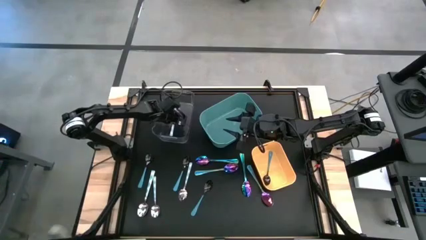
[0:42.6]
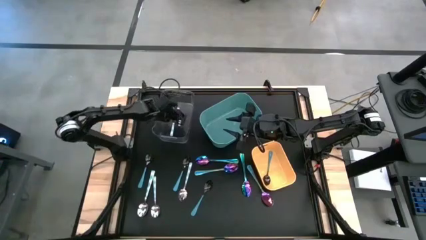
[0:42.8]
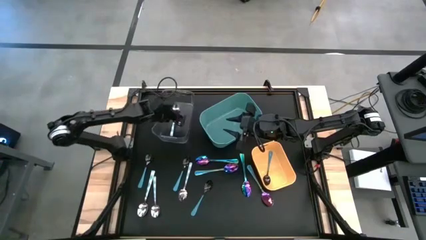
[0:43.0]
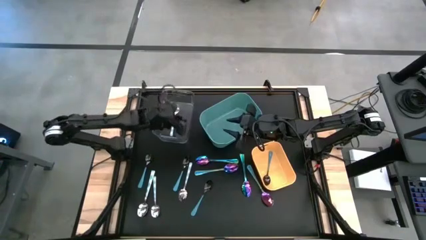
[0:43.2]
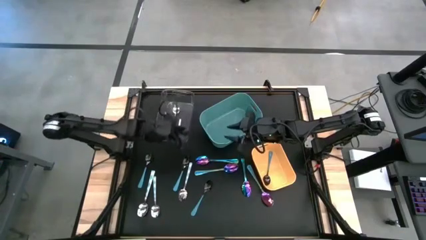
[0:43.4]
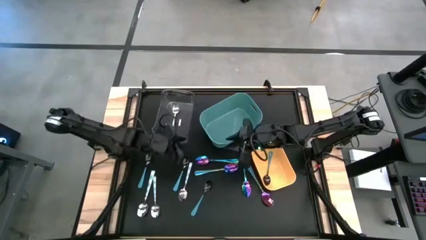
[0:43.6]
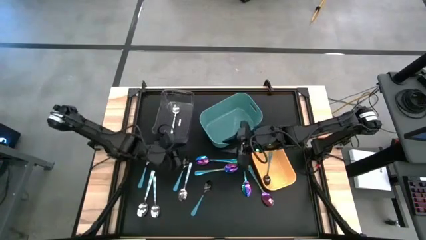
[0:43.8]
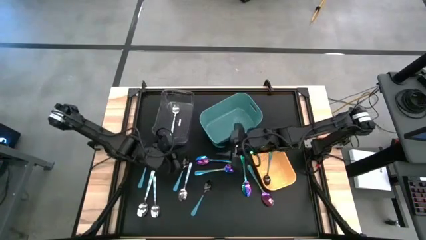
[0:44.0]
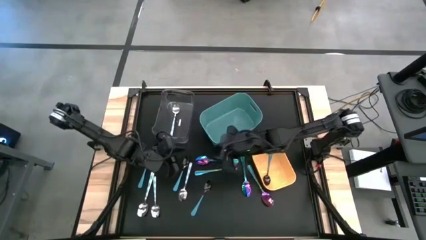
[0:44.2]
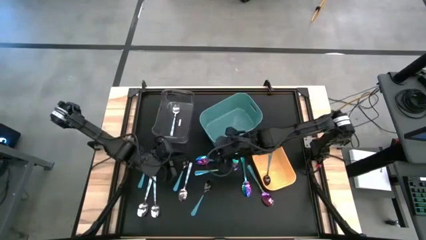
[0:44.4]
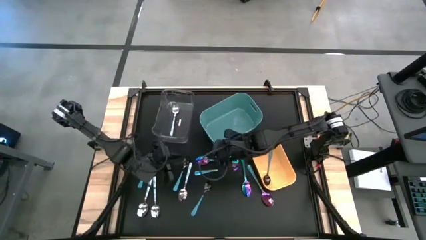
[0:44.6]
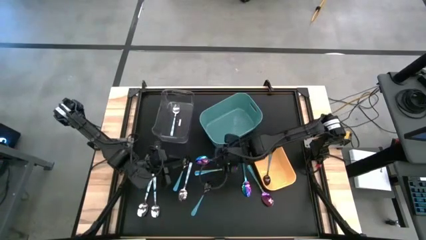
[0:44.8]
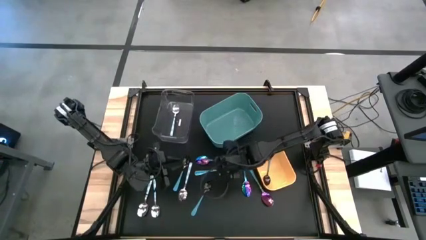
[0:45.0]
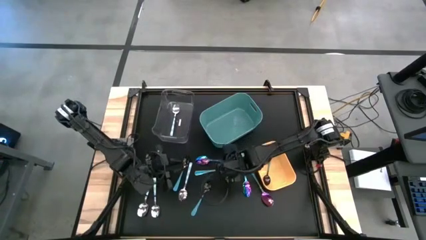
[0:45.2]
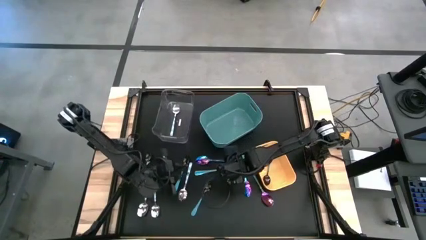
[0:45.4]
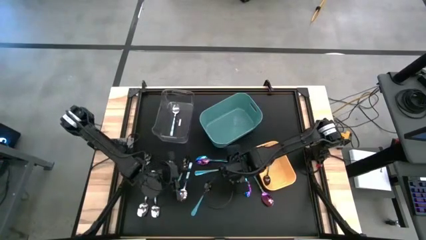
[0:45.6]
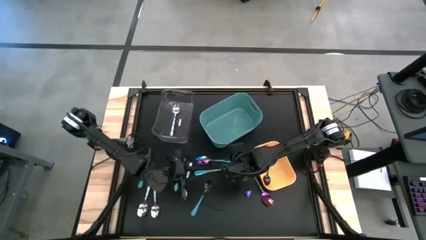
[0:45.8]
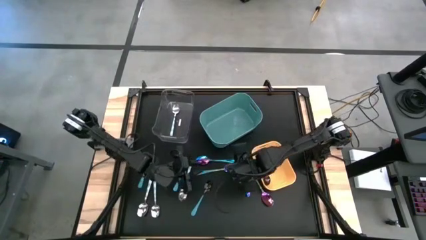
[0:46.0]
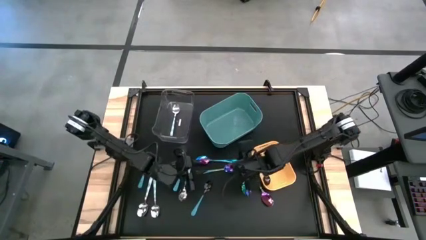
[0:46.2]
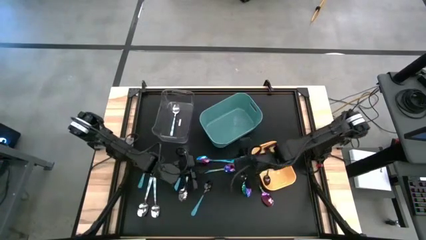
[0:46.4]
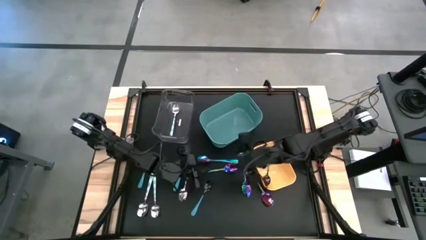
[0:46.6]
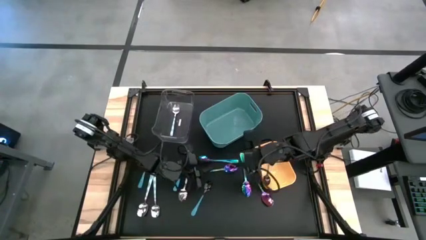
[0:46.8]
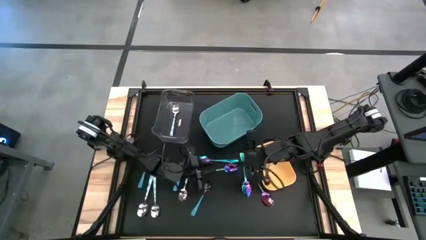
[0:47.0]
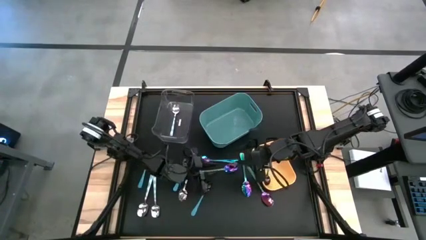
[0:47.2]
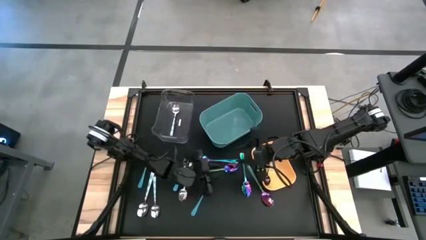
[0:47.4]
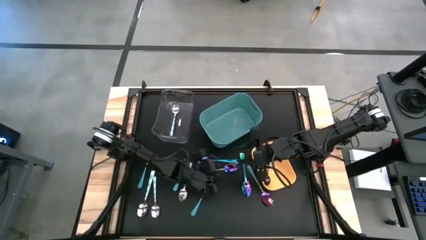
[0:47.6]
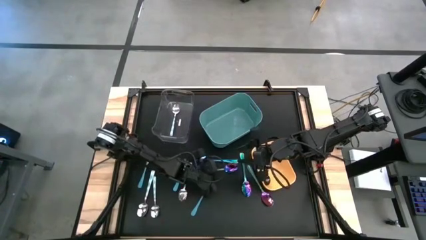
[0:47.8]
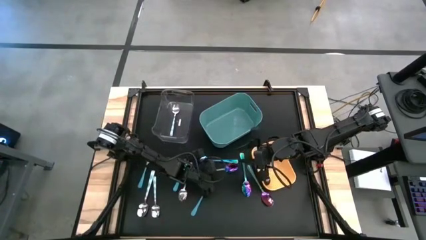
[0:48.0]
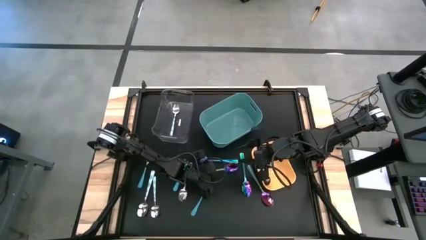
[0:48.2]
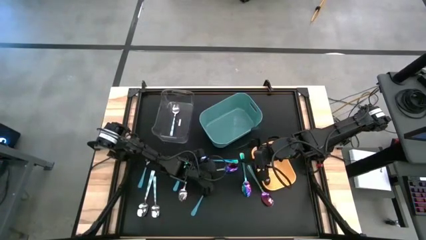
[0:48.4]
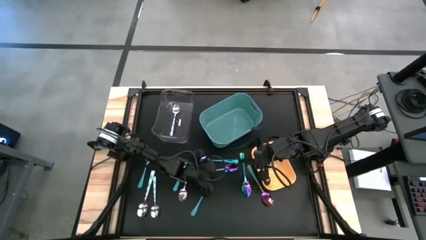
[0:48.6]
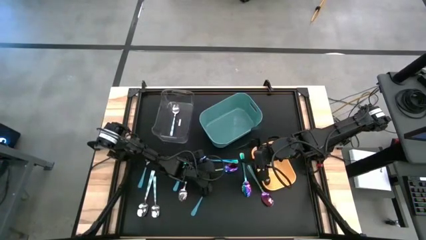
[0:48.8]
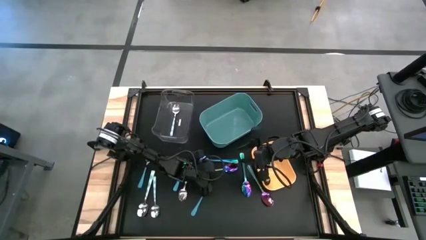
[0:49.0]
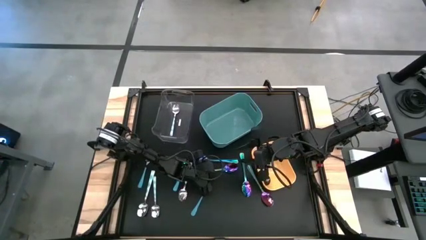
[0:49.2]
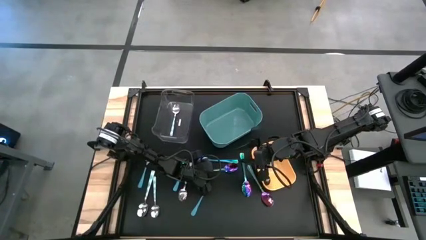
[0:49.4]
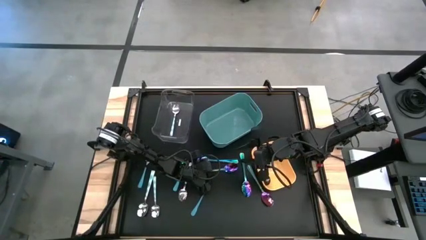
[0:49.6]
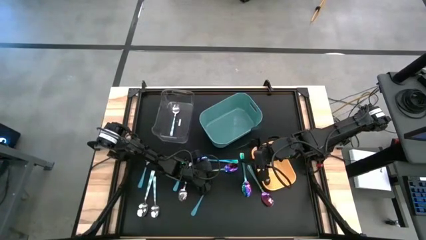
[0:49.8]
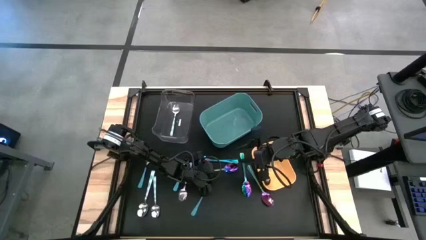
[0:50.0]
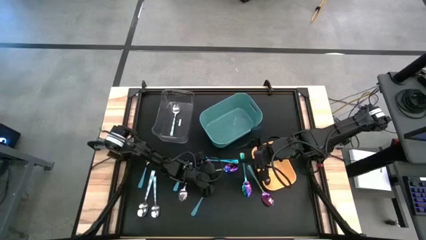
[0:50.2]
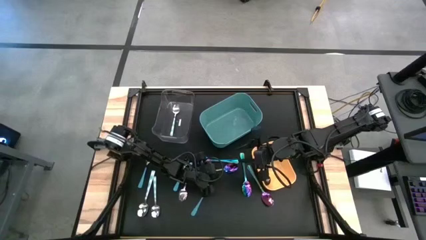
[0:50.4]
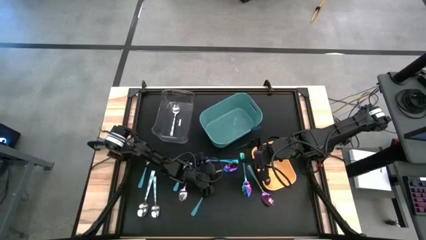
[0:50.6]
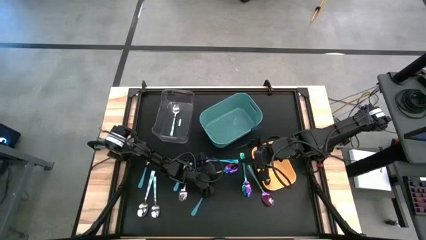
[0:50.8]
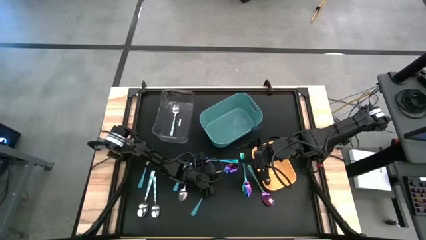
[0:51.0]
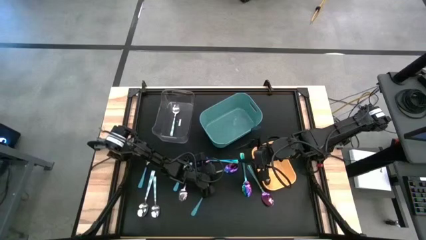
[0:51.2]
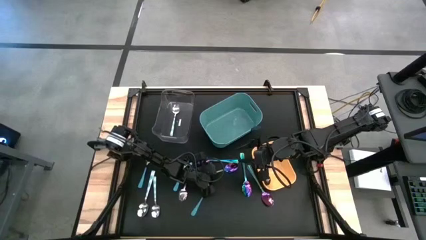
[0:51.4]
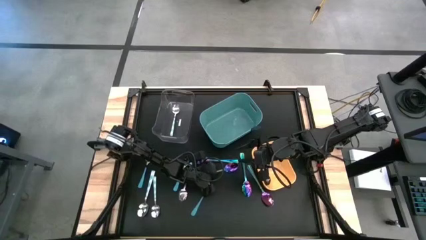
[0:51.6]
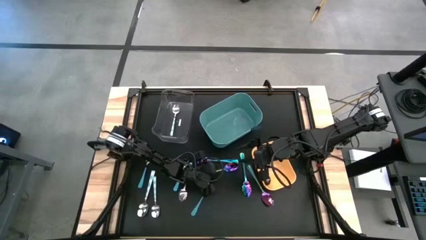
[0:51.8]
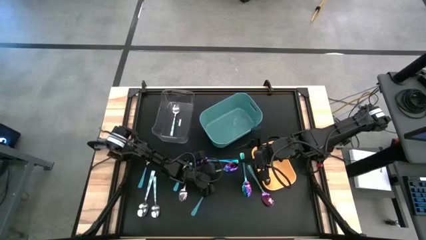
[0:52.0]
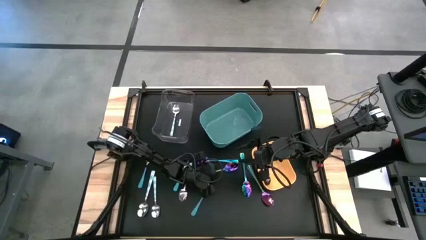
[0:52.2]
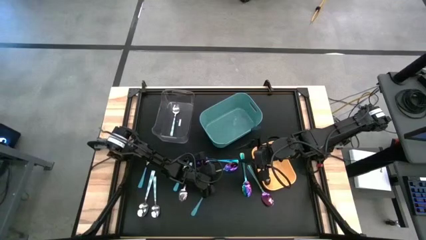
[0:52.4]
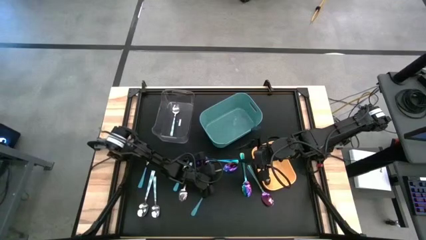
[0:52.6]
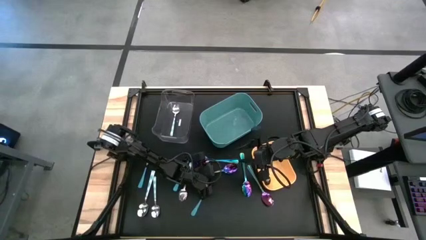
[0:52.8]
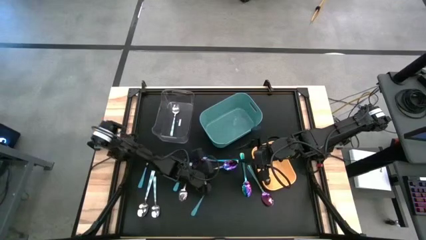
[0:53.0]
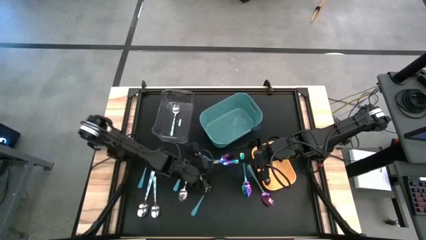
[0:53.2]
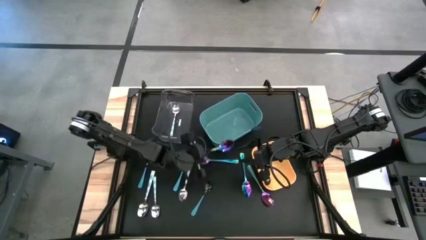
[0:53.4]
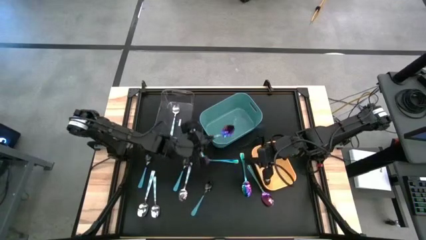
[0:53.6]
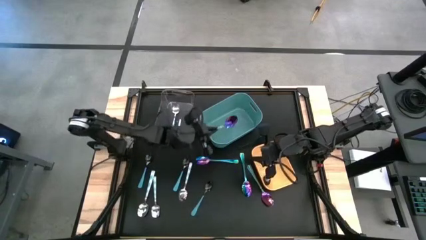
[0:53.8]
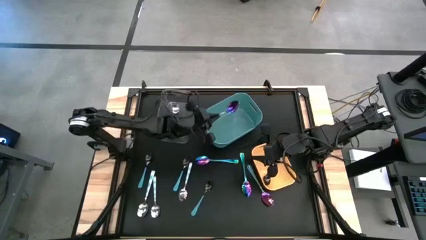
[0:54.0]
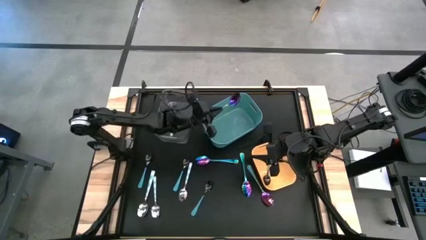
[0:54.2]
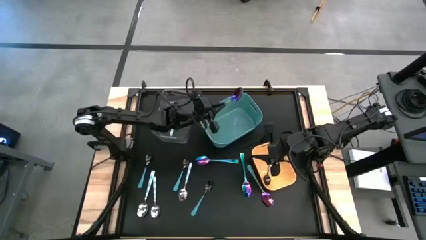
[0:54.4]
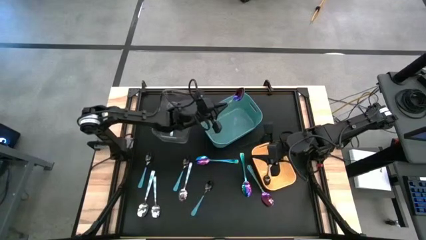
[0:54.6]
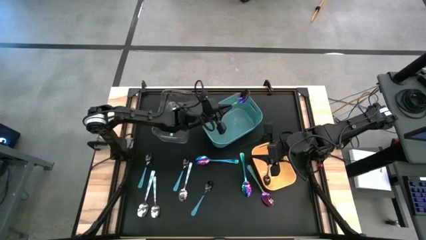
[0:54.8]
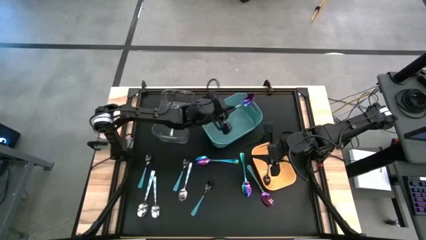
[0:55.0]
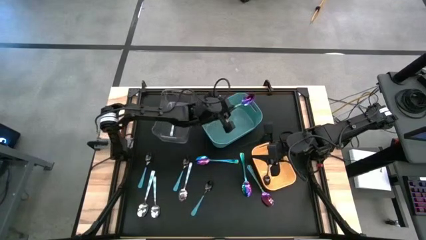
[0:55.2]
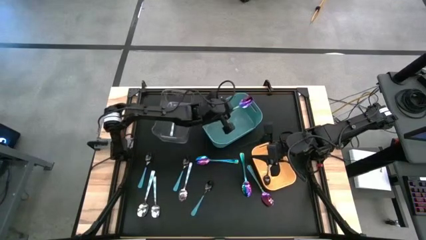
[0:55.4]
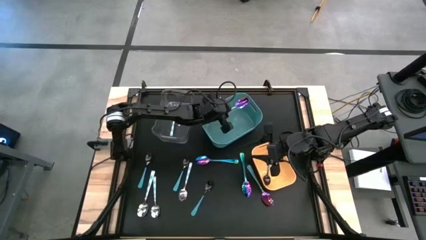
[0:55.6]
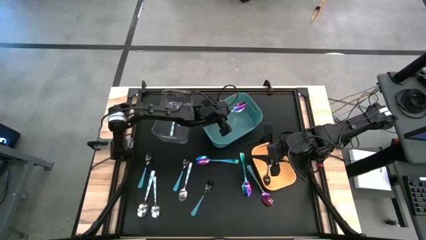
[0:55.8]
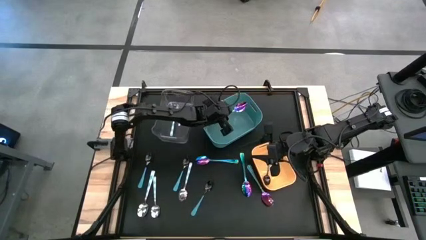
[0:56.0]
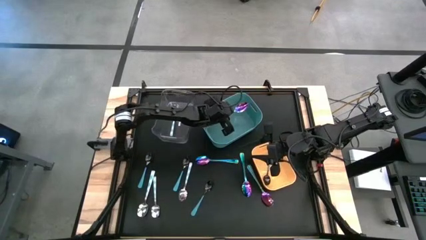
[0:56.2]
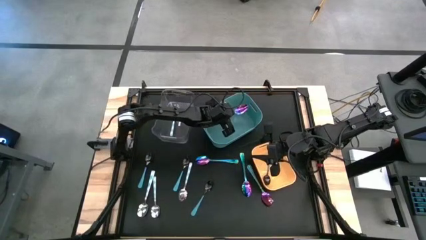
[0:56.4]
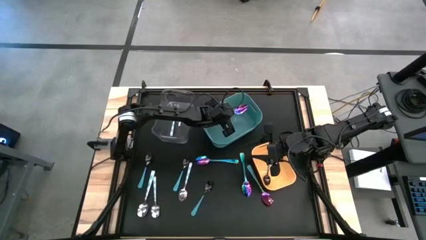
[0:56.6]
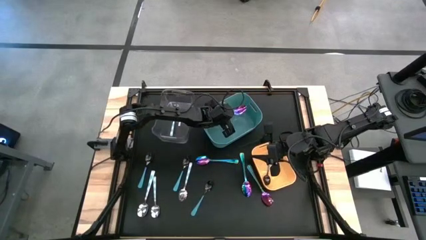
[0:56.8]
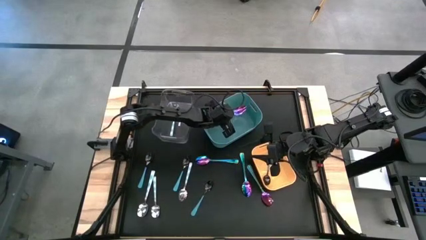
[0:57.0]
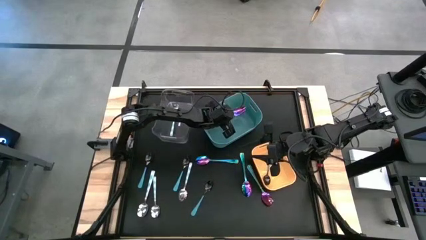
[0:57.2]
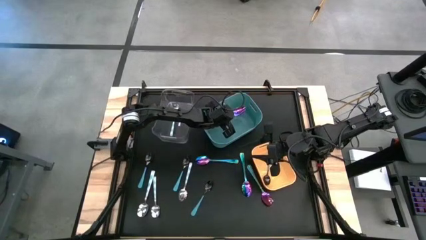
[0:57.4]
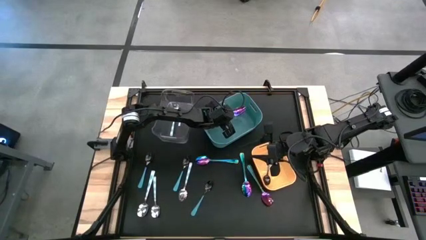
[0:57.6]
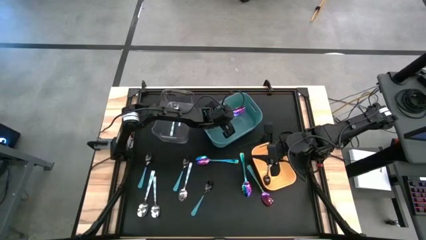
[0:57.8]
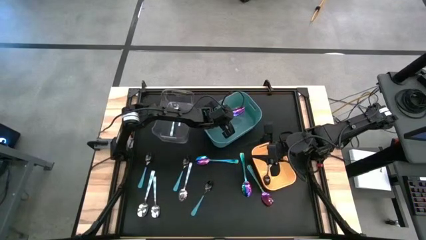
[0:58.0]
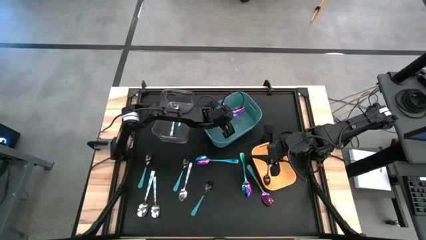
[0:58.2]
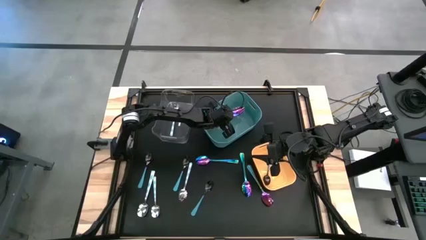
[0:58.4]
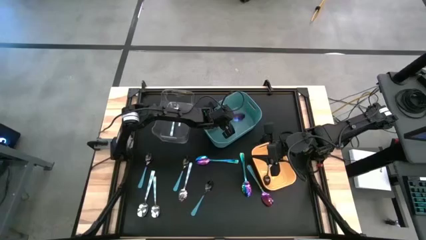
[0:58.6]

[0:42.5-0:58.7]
Task: Sort silverware by color (type)
Put the purple spoon into the green bin

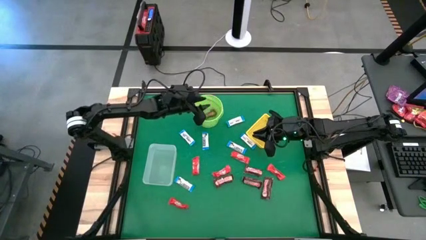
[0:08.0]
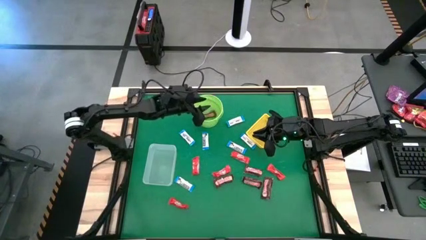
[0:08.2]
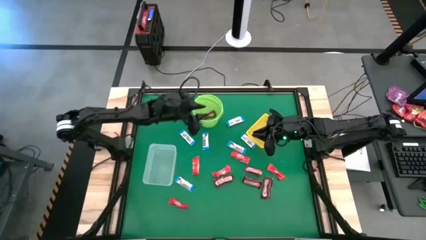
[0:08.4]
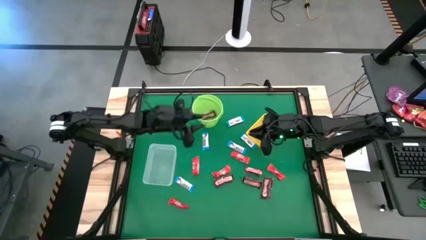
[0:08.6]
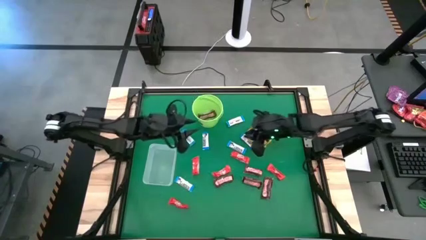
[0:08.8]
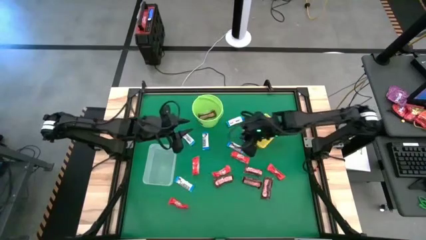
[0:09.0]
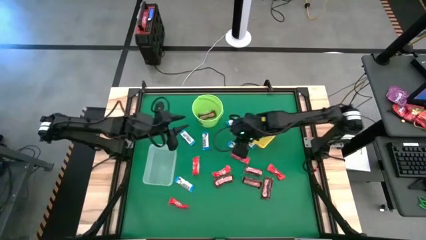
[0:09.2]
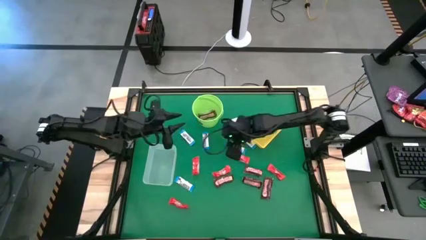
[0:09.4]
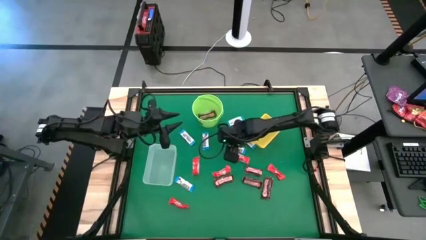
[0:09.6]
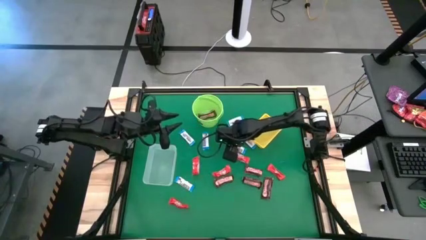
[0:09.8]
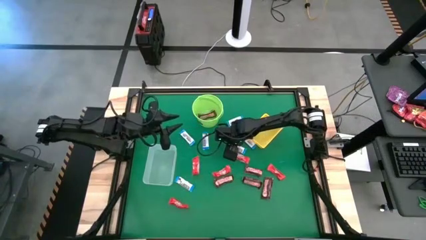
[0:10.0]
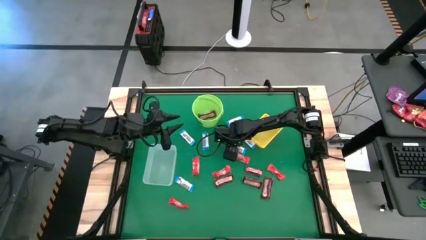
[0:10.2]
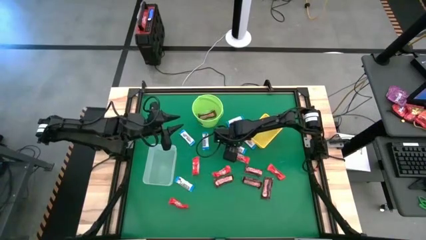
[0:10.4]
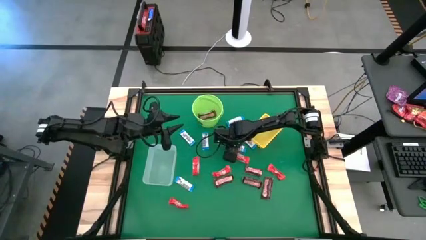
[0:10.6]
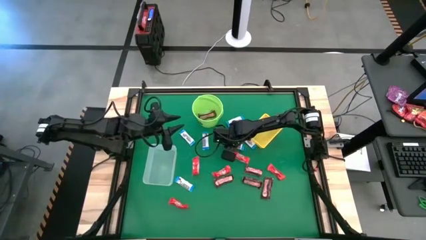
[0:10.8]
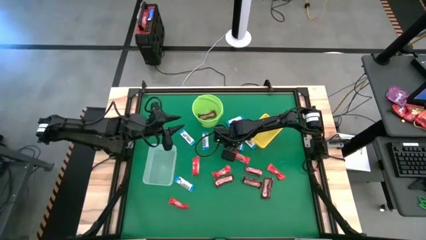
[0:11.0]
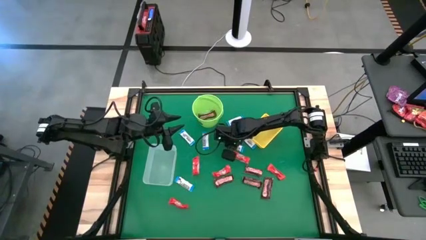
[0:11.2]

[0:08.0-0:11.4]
Task: Sort candy by brand, put in halloween buckets
Put the white chocolate bar into the yellow bin
